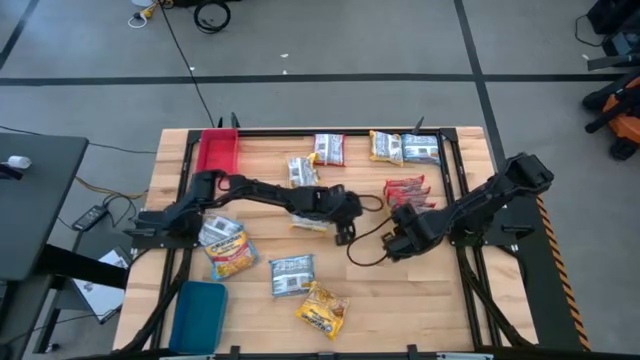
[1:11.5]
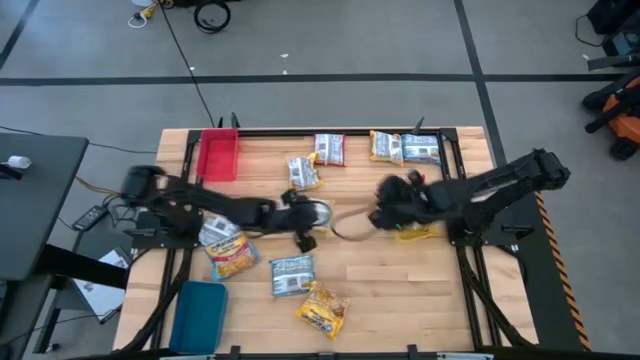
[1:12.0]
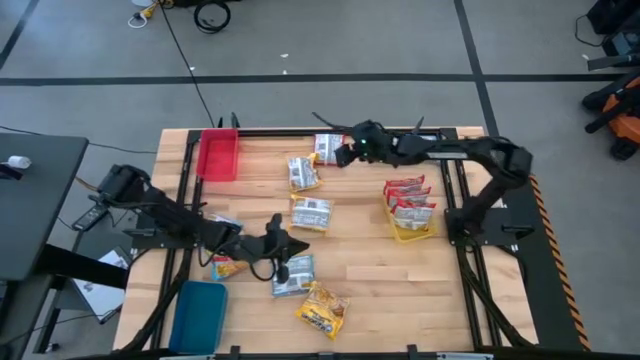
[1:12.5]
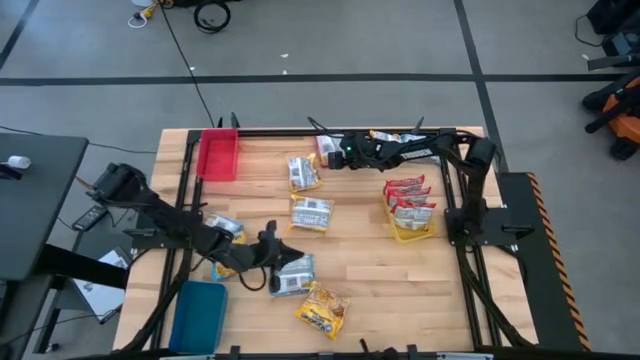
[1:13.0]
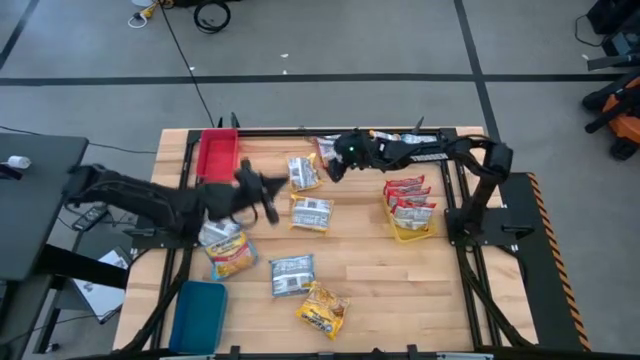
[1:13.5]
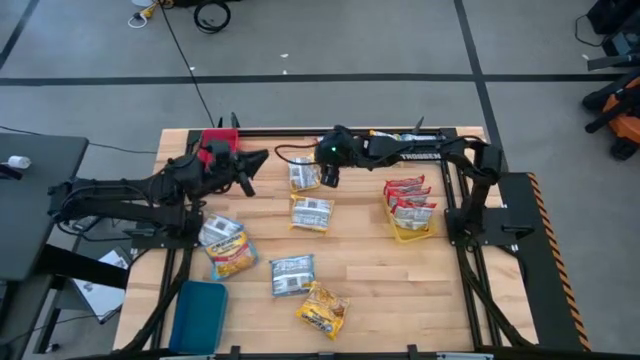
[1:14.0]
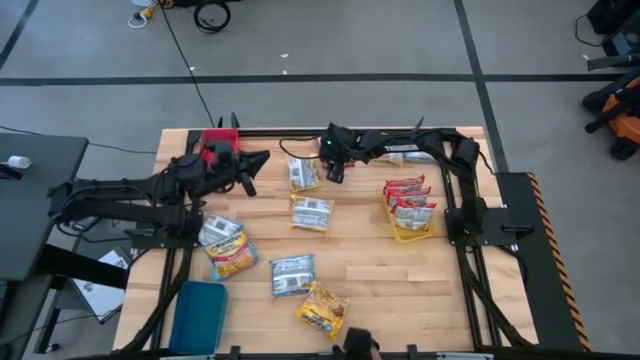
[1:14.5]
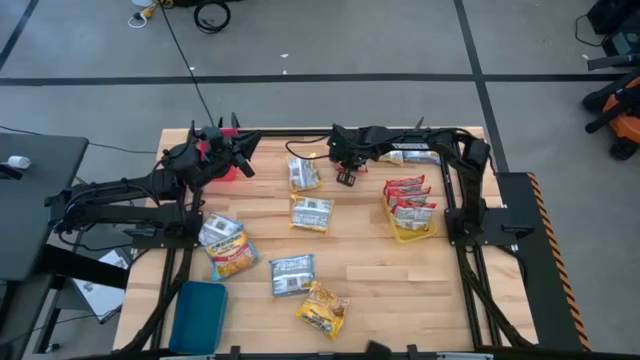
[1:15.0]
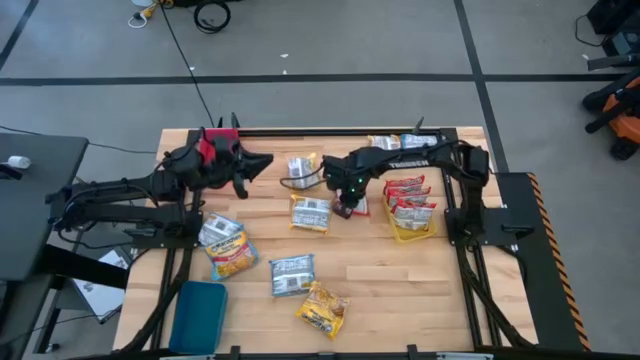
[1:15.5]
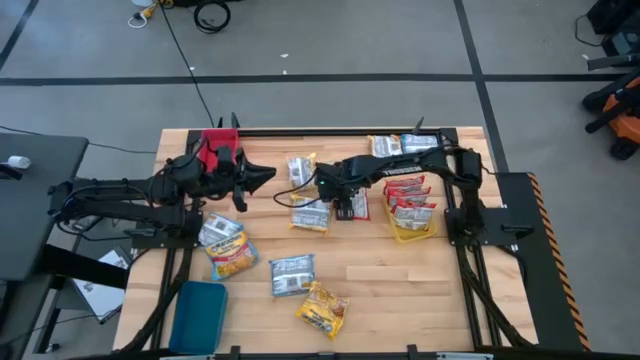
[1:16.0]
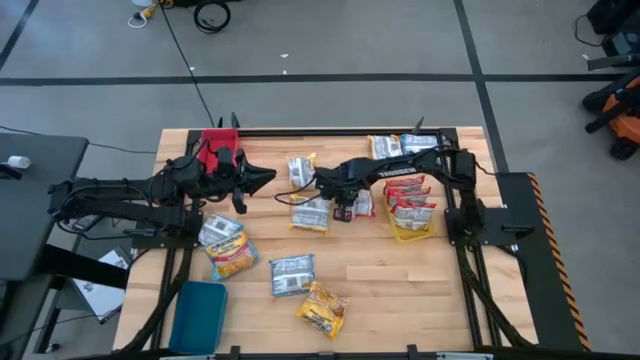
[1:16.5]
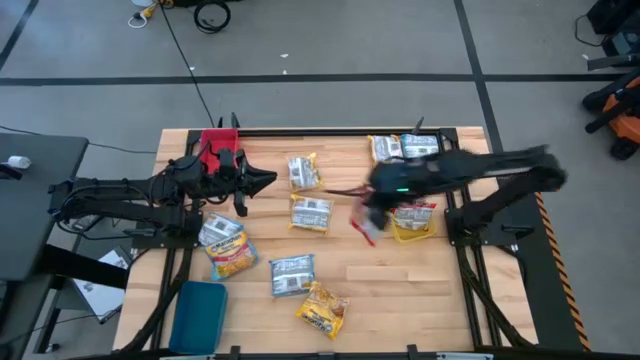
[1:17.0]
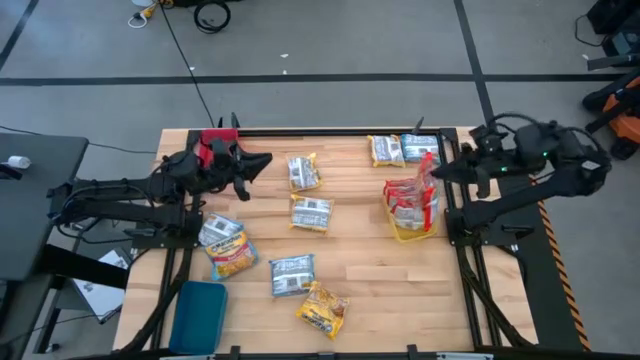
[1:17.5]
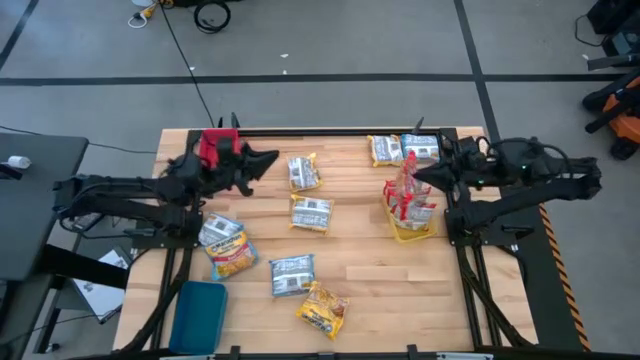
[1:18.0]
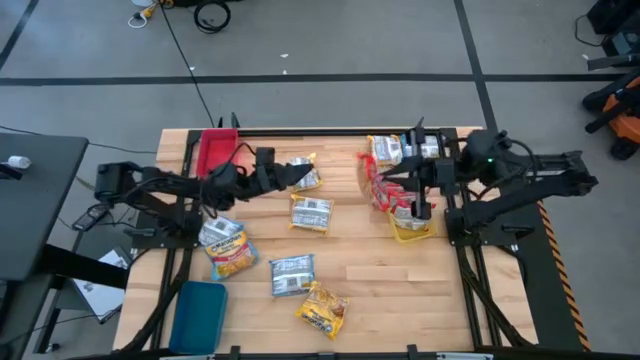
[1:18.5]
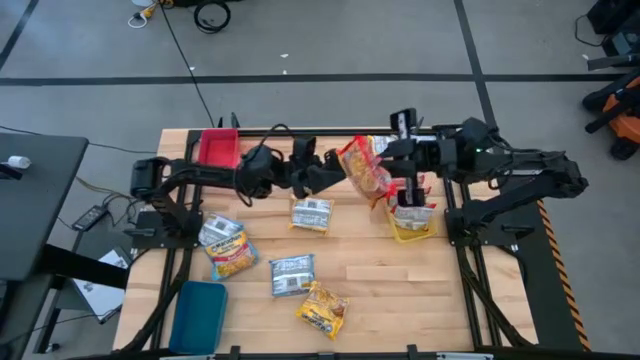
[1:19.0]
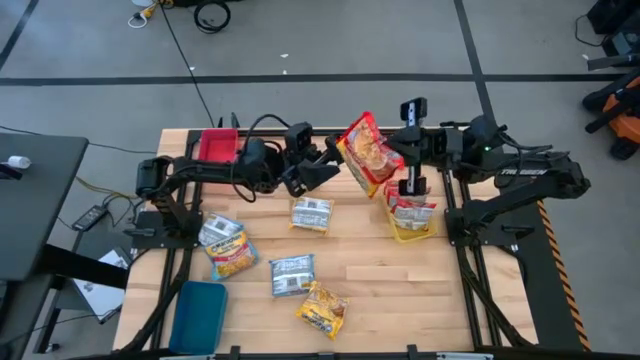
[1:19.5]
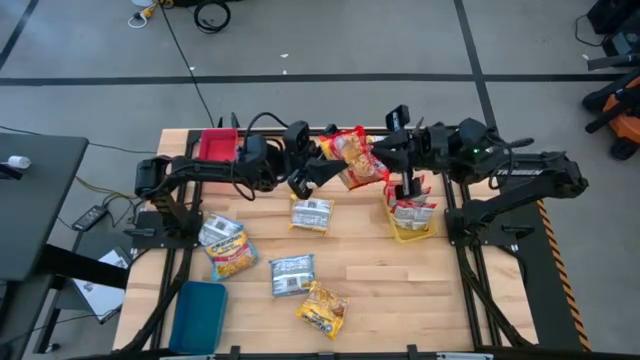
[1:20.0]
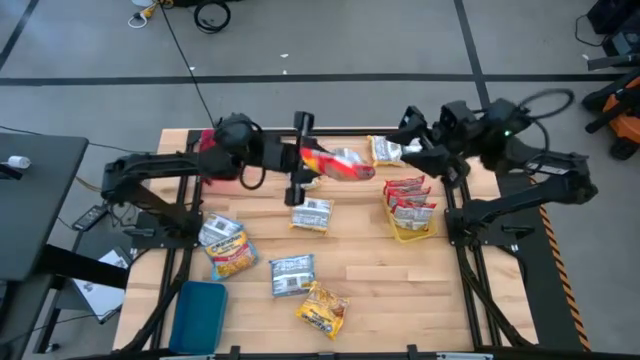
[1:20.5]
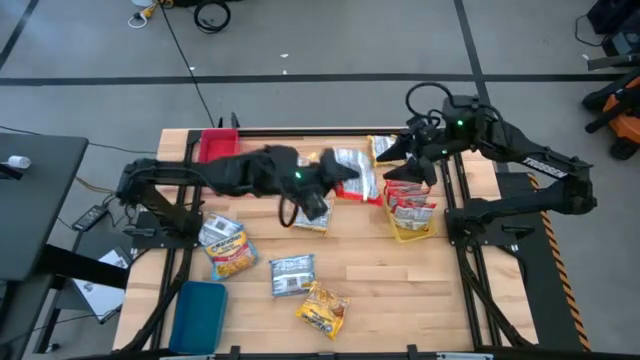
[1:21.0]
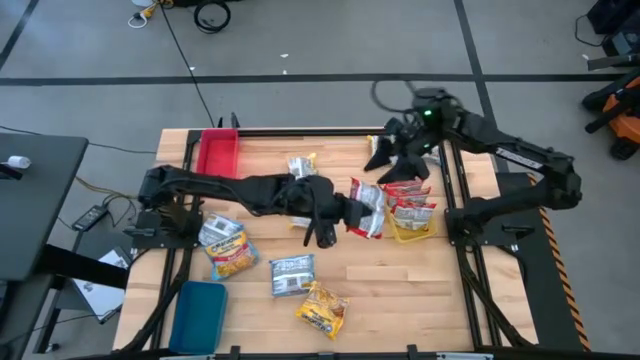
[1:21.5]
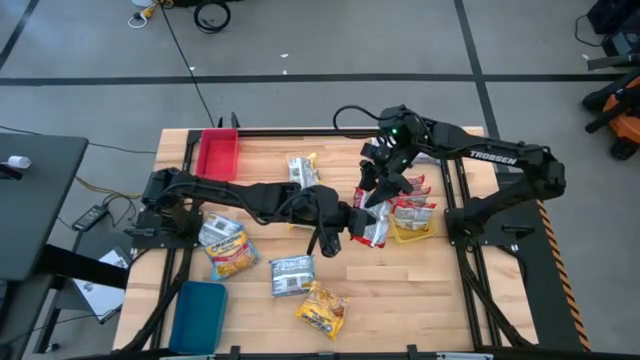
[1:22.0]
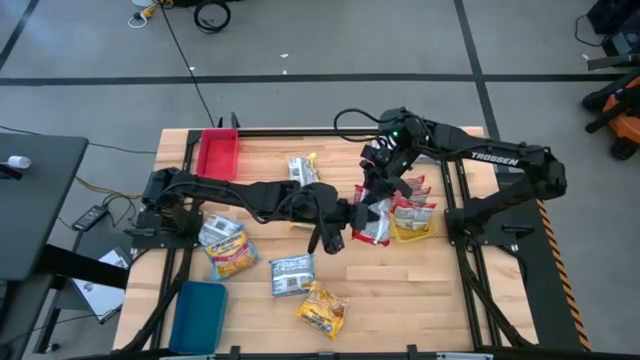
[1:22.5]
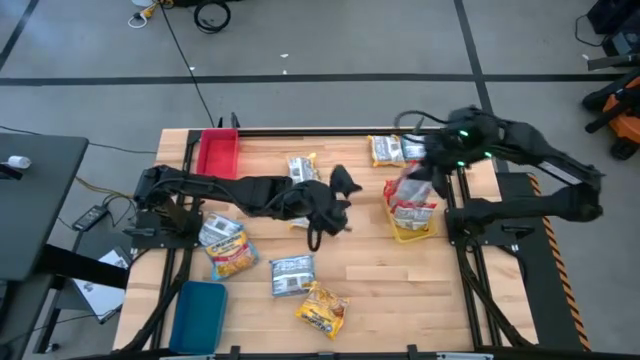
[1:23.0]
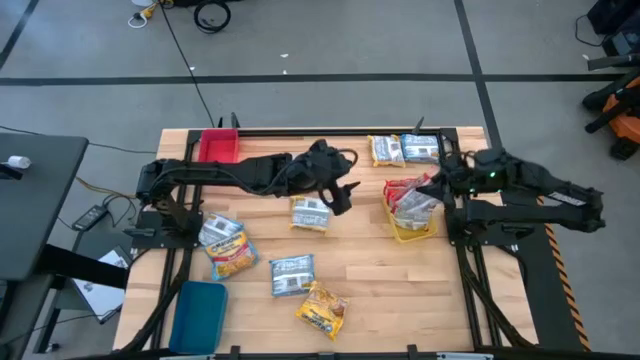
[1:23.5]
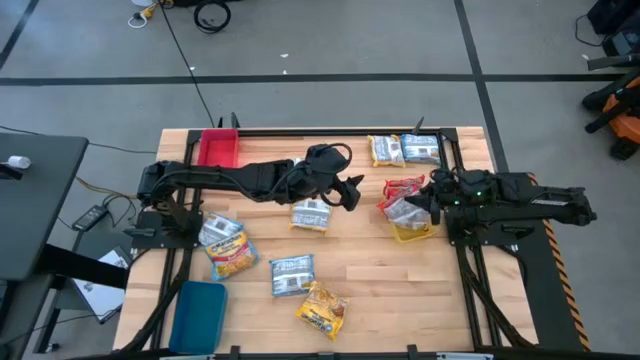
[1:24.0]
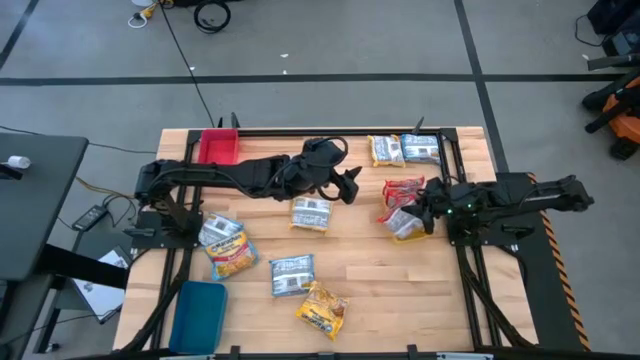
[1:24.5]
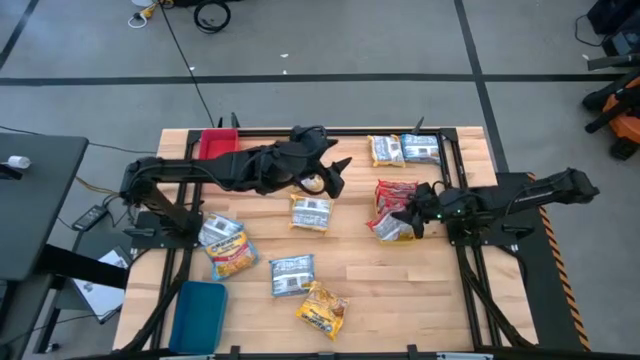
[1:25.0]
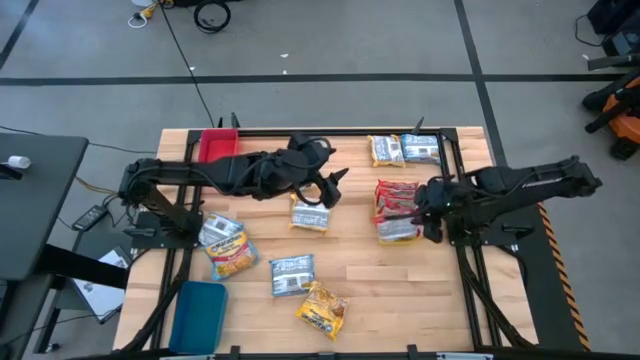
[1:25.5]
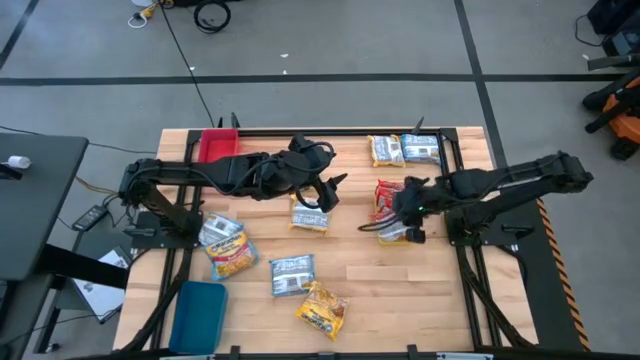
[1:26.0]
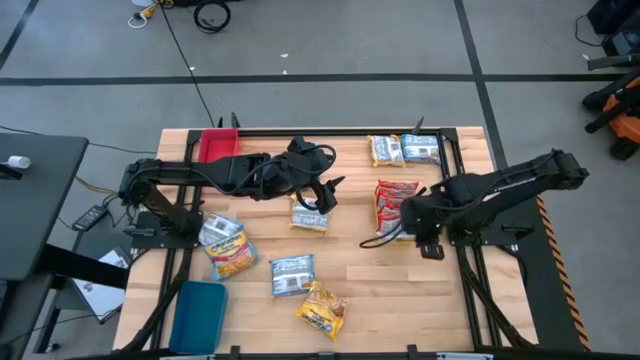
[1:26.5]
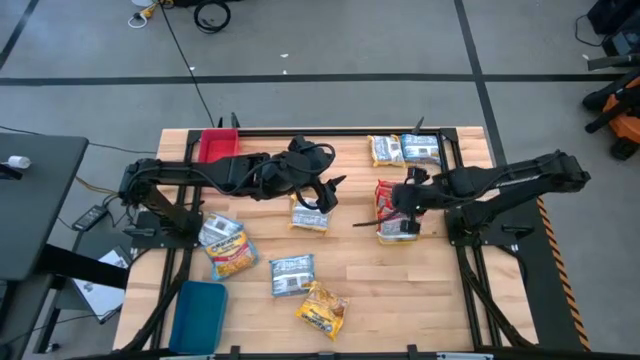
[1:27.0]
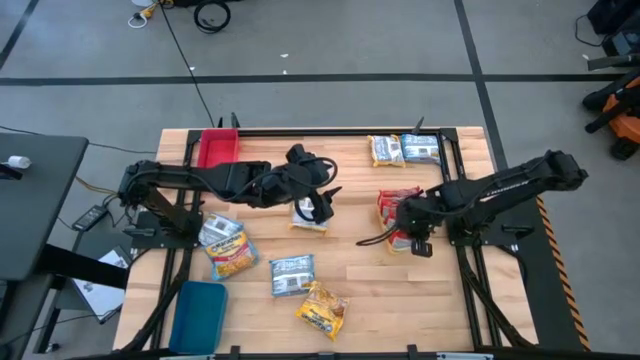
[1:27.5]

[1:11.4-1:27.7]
Task: Sort Maruchan noodles
Put the red noodle pack into the yellow bin

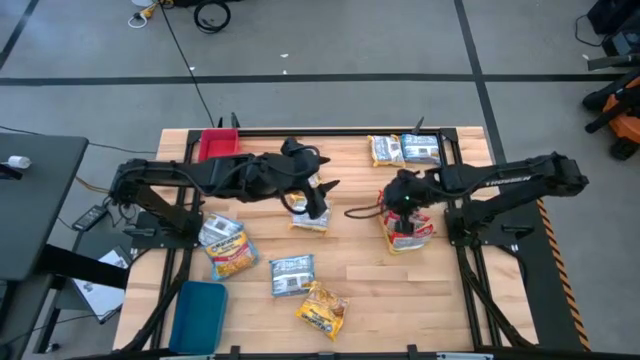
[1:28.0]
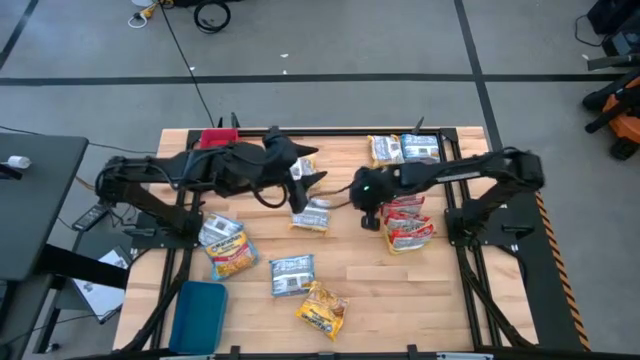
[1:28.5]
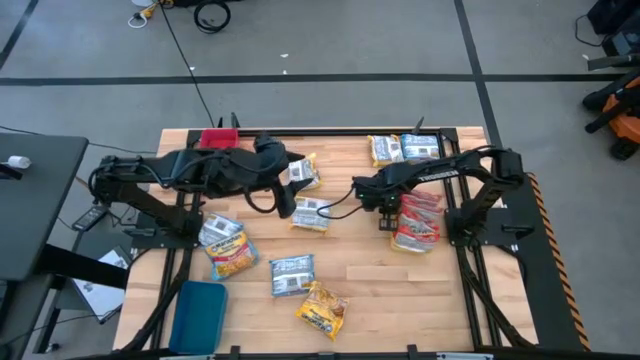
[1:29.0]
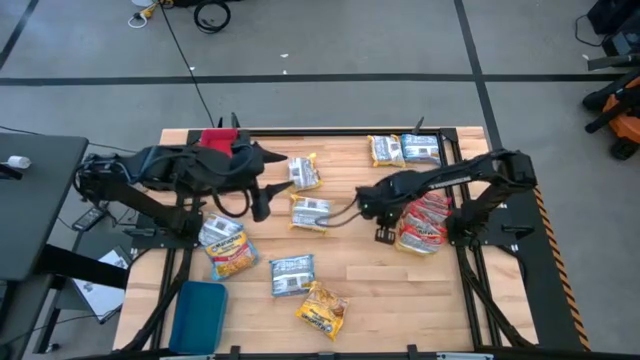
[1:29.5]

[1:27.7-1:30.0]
Adjust the yellow bin

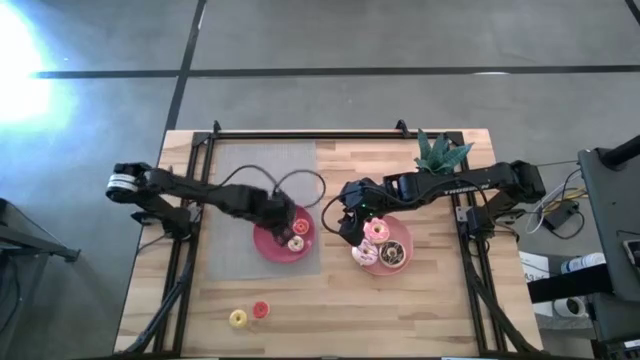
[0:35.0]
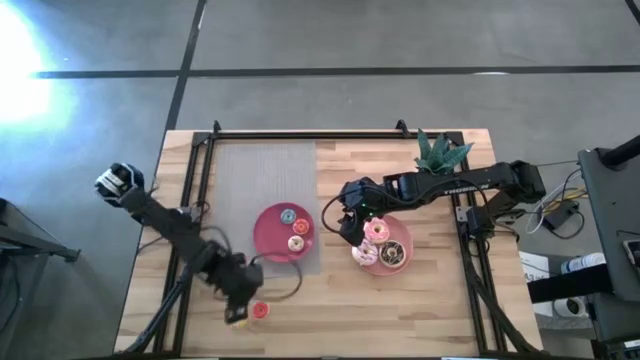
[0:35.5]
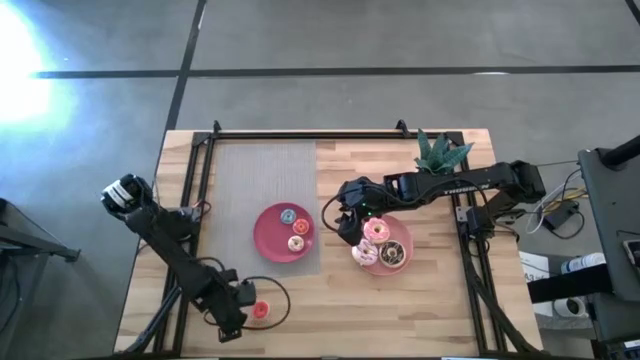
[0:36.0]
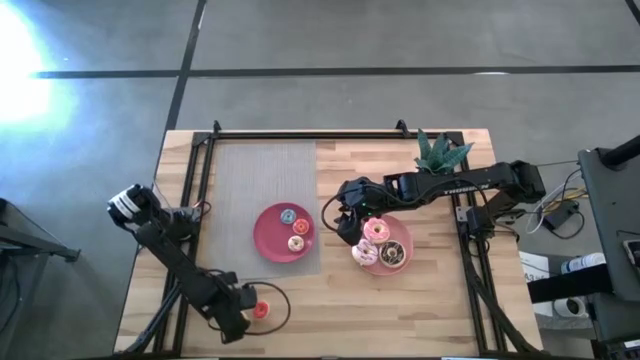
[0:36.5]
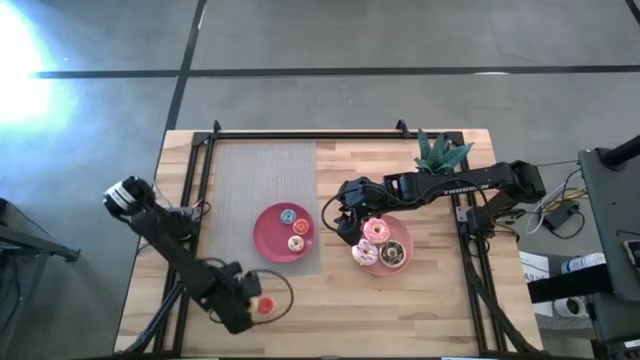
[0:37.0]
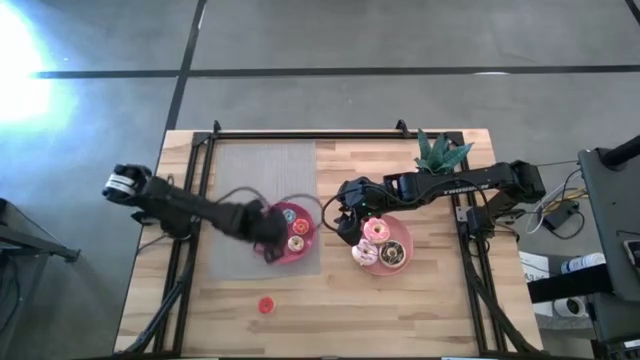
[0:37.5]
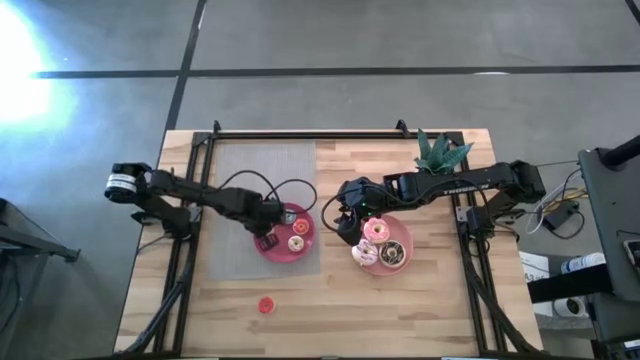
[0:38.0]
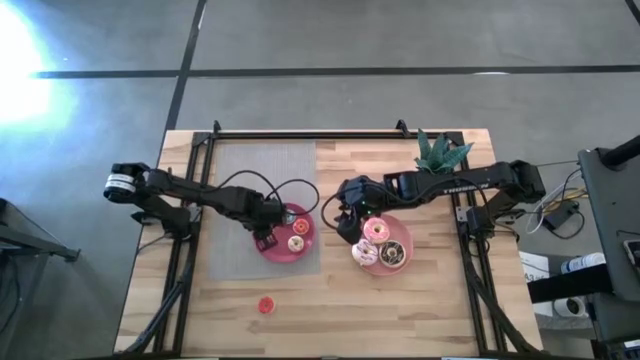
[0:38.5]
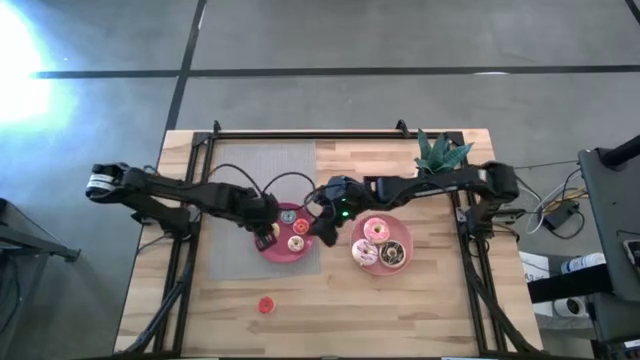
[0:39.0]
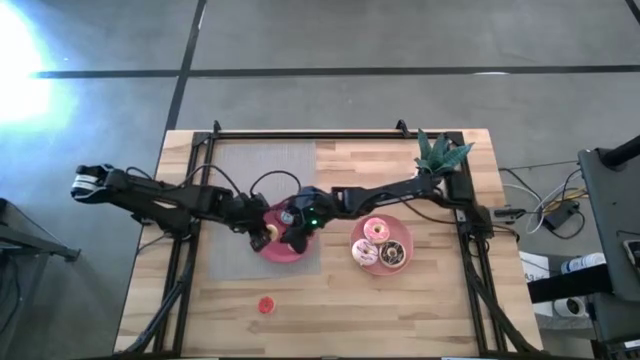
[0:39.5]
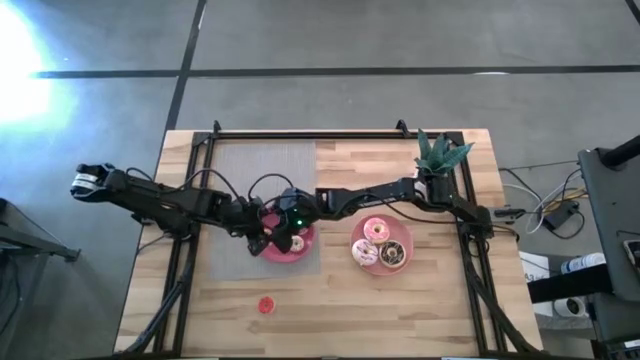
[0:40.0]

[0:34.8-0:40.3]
Task: Pick & Place donuts
Put the small yellow donut on the dark pink plate
